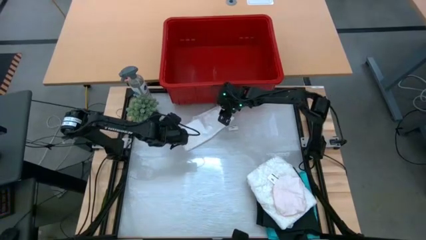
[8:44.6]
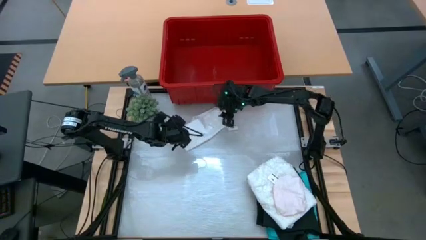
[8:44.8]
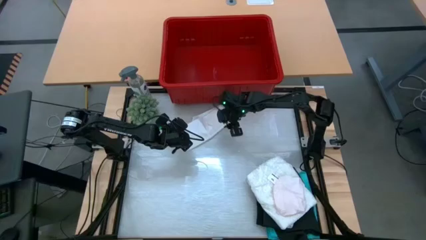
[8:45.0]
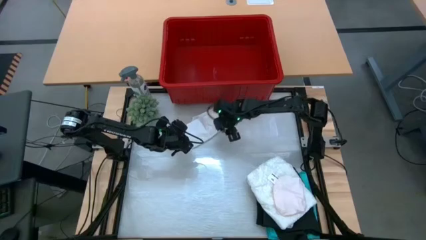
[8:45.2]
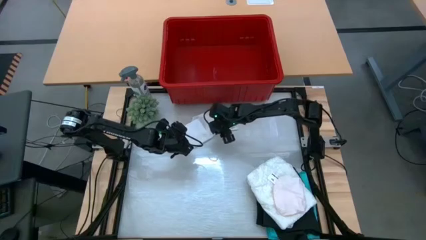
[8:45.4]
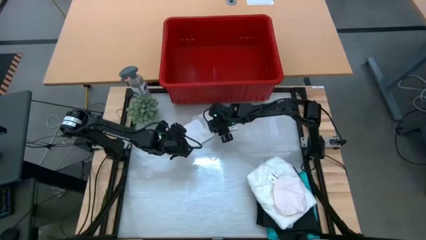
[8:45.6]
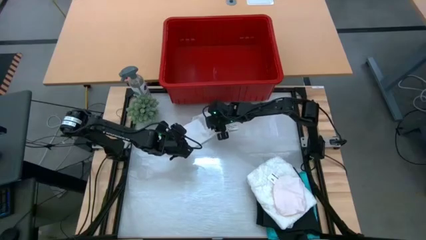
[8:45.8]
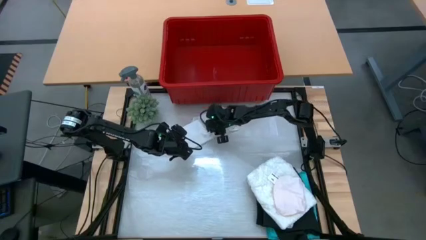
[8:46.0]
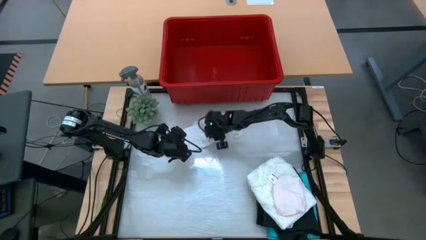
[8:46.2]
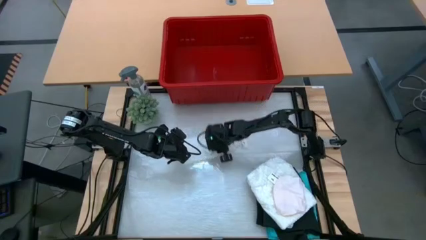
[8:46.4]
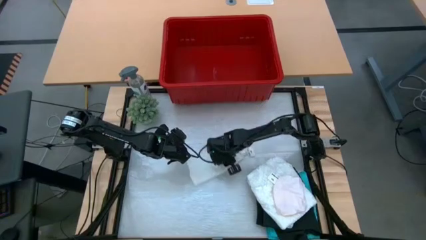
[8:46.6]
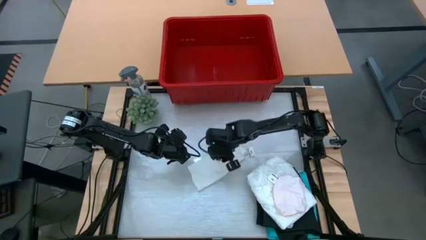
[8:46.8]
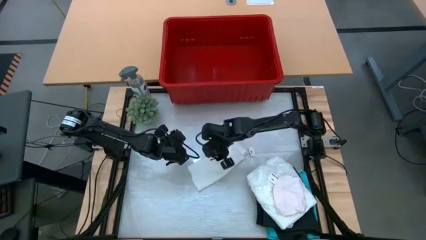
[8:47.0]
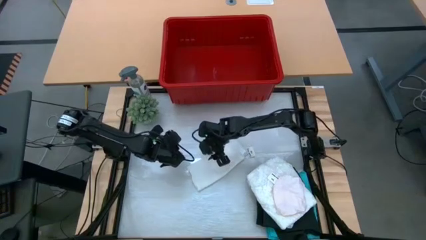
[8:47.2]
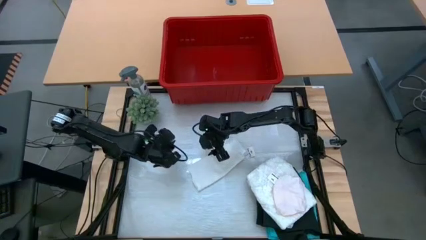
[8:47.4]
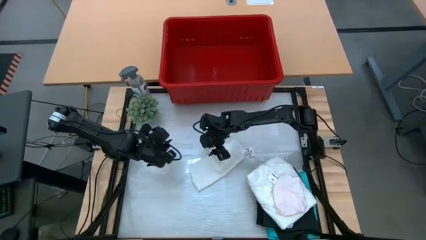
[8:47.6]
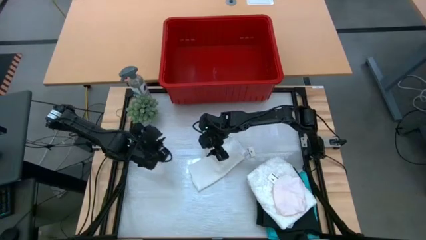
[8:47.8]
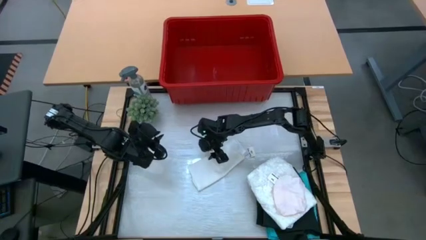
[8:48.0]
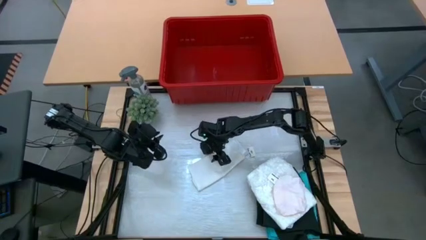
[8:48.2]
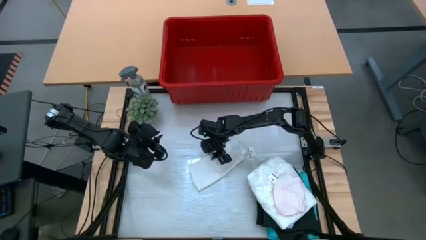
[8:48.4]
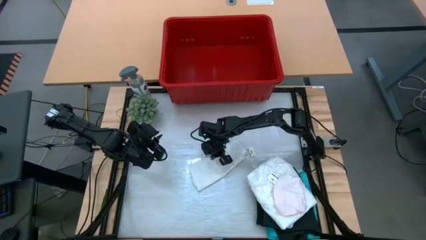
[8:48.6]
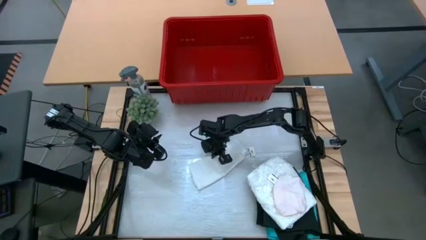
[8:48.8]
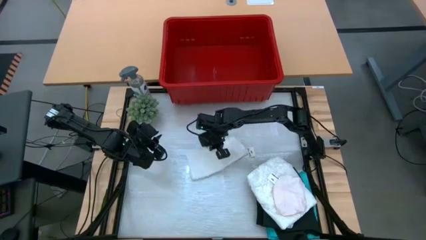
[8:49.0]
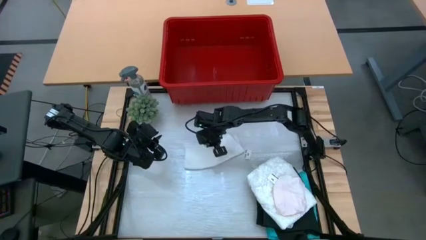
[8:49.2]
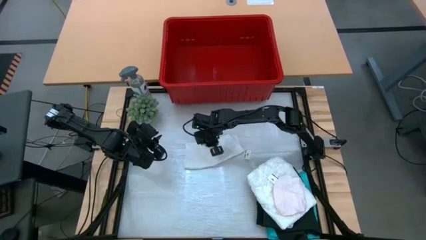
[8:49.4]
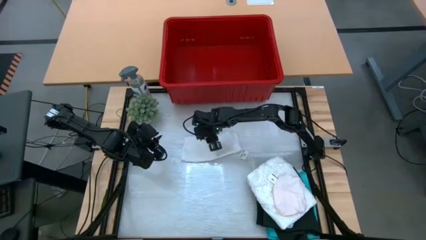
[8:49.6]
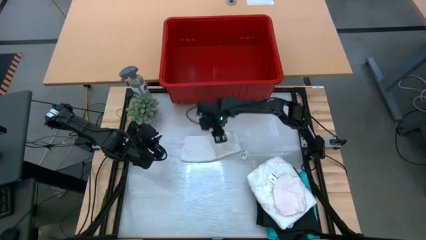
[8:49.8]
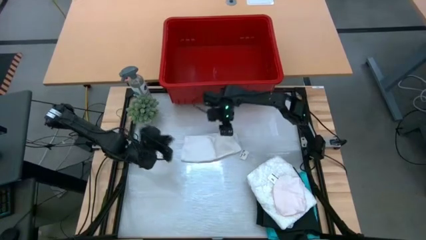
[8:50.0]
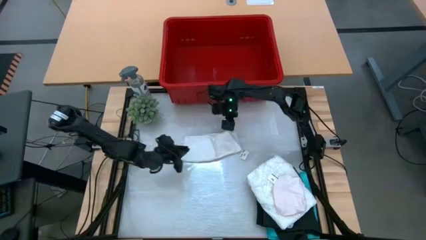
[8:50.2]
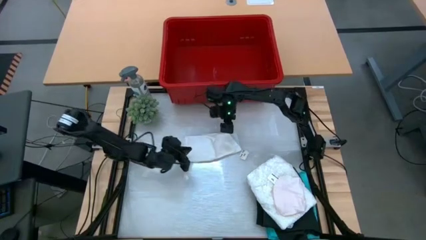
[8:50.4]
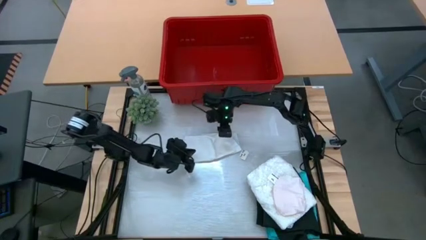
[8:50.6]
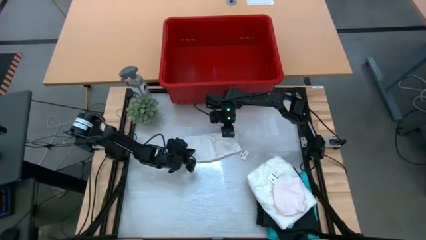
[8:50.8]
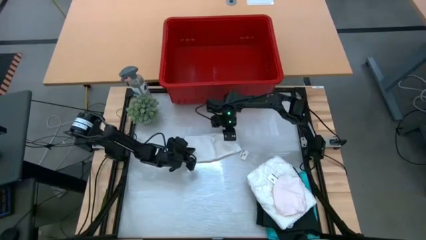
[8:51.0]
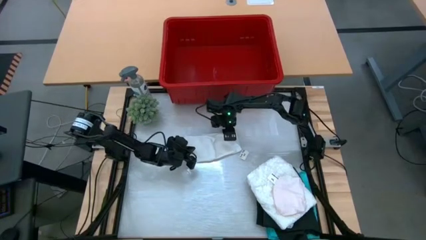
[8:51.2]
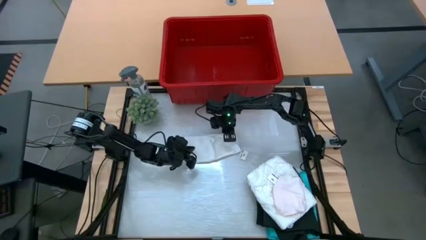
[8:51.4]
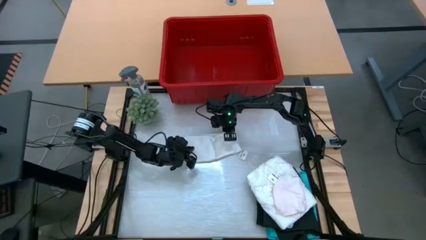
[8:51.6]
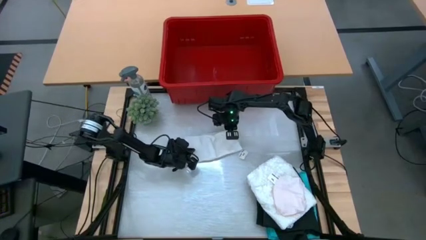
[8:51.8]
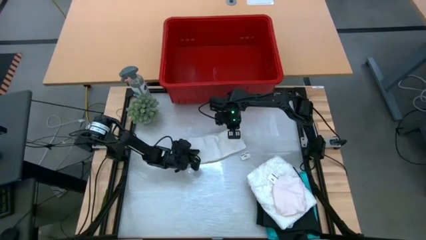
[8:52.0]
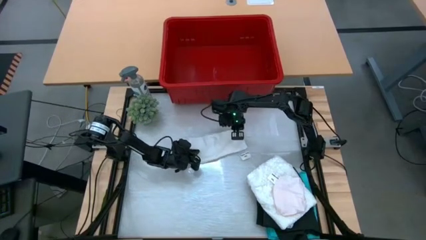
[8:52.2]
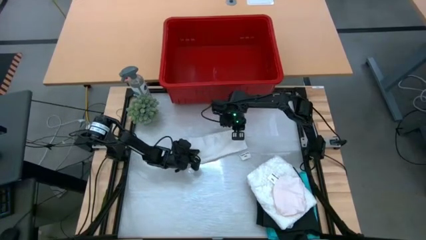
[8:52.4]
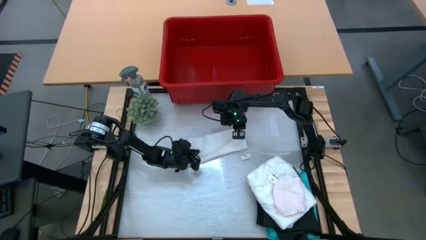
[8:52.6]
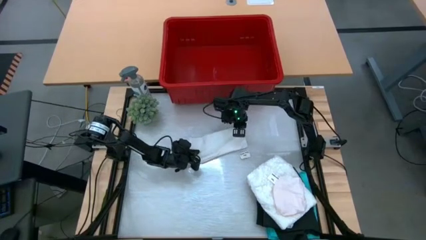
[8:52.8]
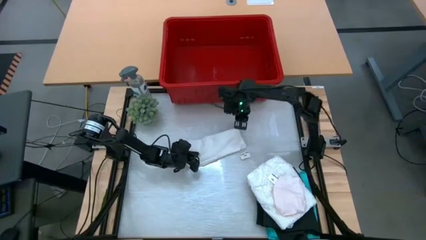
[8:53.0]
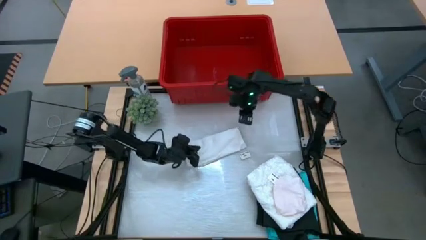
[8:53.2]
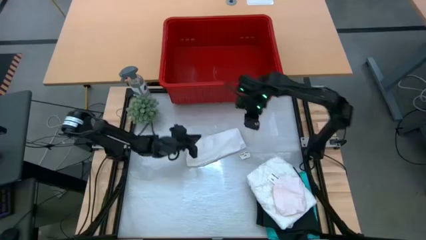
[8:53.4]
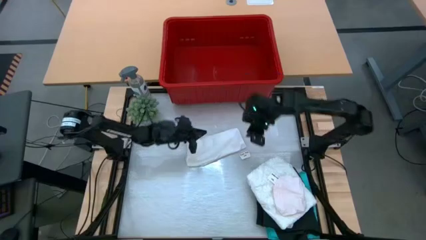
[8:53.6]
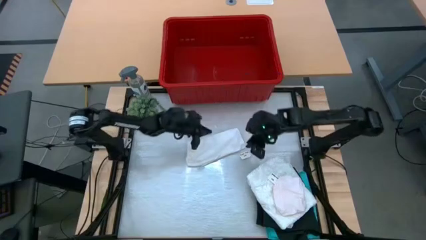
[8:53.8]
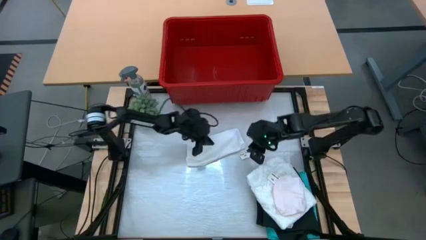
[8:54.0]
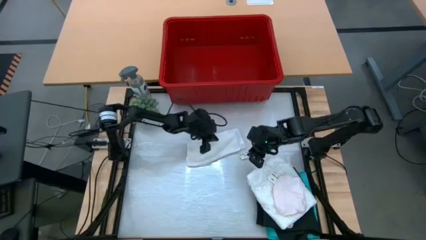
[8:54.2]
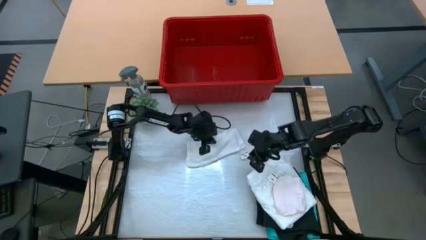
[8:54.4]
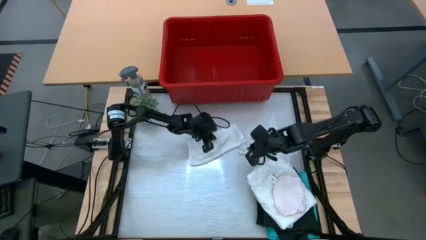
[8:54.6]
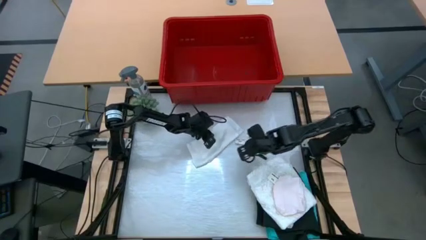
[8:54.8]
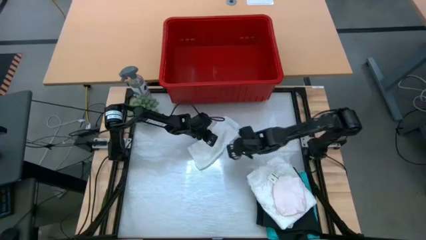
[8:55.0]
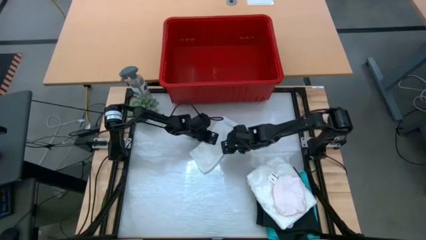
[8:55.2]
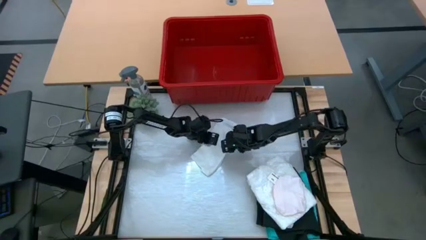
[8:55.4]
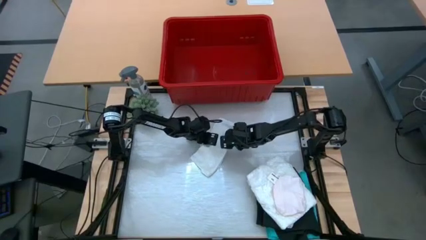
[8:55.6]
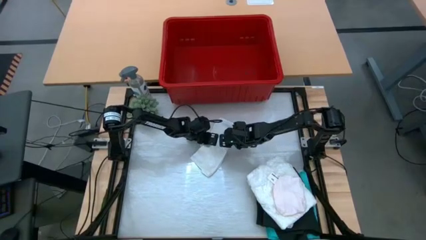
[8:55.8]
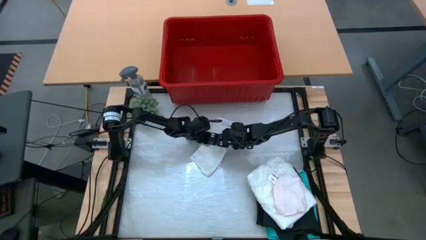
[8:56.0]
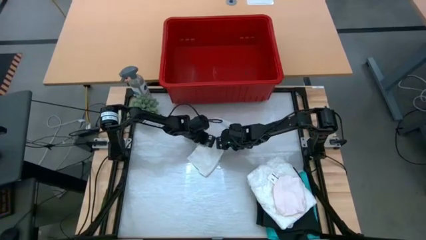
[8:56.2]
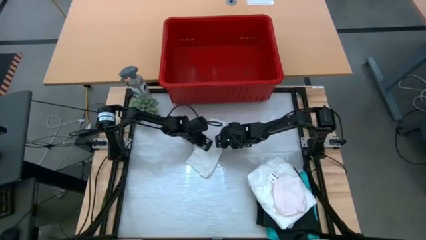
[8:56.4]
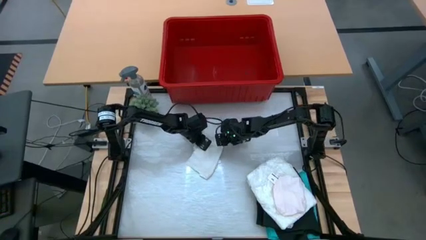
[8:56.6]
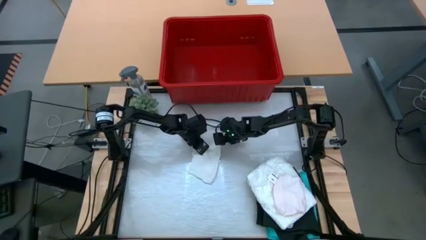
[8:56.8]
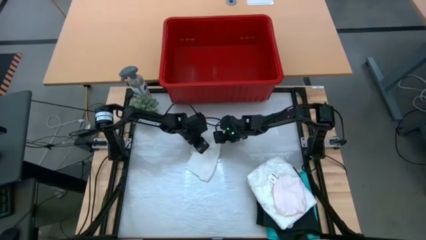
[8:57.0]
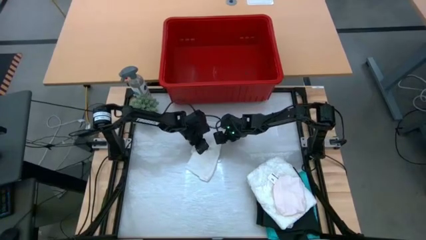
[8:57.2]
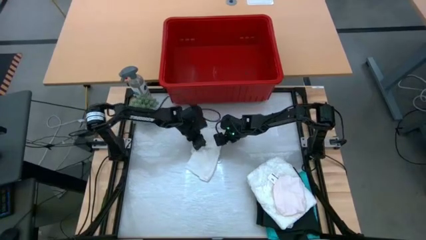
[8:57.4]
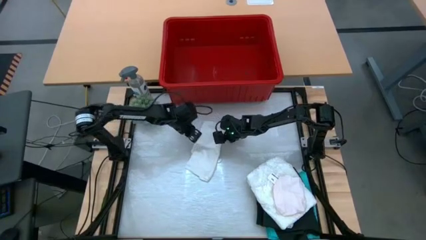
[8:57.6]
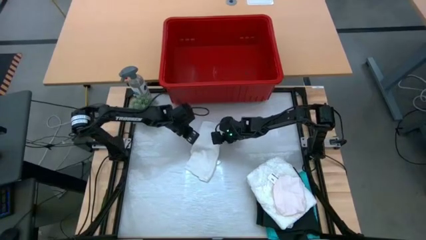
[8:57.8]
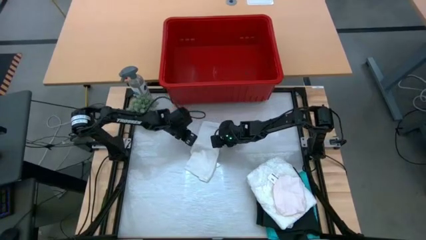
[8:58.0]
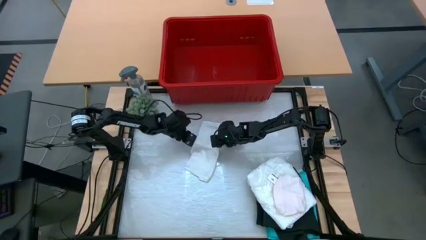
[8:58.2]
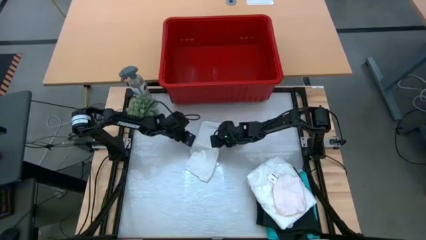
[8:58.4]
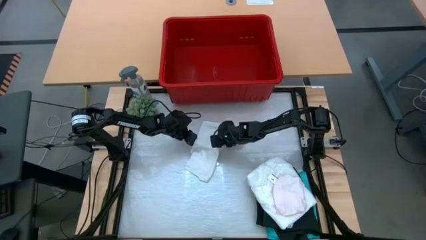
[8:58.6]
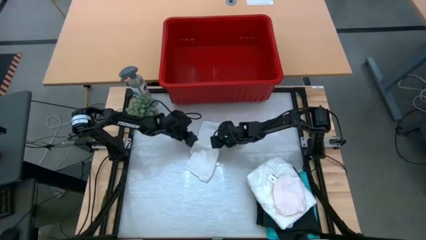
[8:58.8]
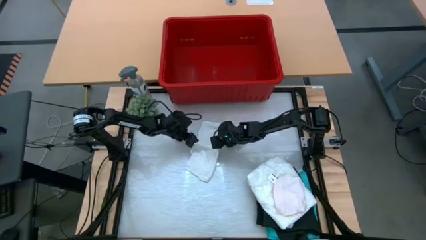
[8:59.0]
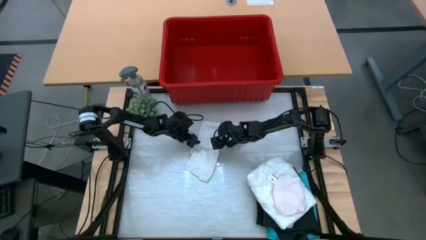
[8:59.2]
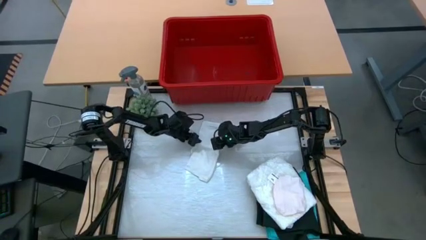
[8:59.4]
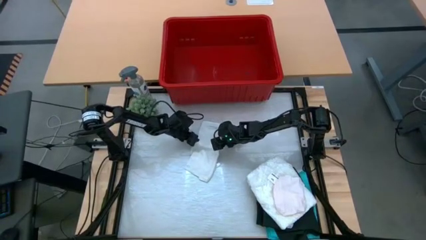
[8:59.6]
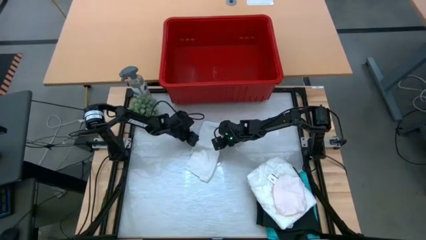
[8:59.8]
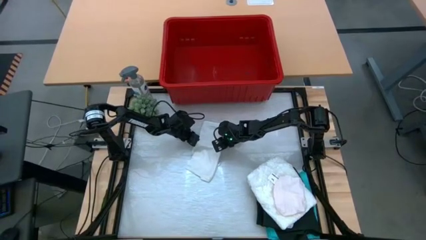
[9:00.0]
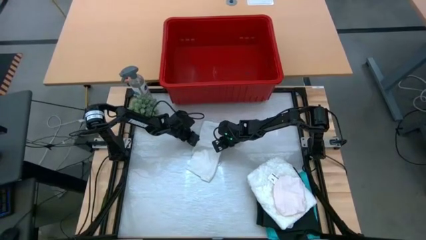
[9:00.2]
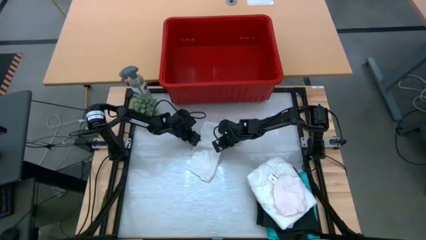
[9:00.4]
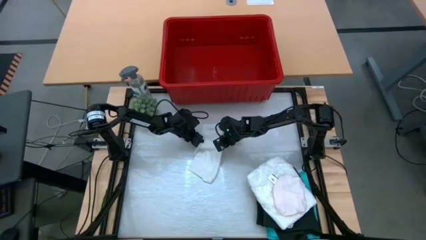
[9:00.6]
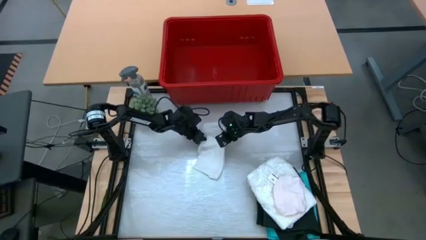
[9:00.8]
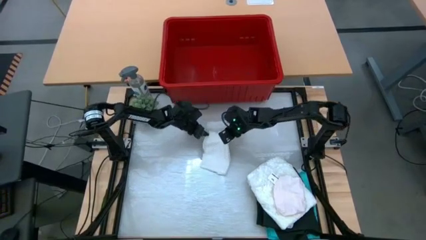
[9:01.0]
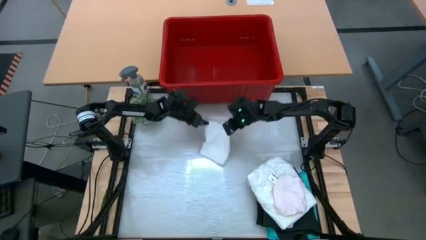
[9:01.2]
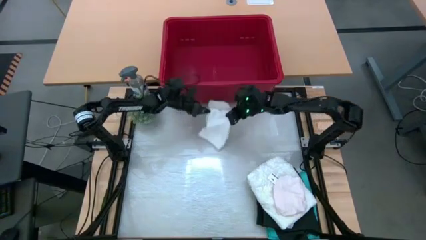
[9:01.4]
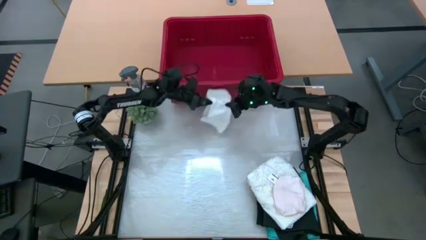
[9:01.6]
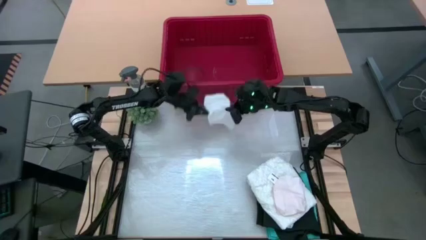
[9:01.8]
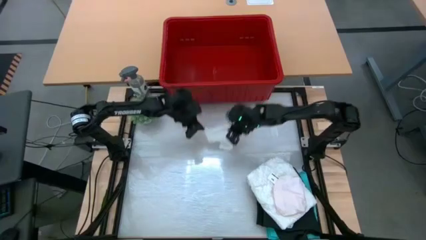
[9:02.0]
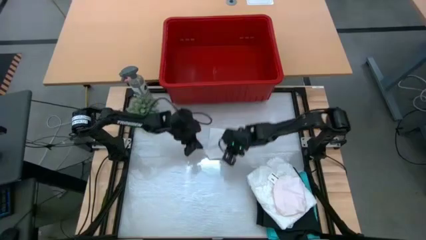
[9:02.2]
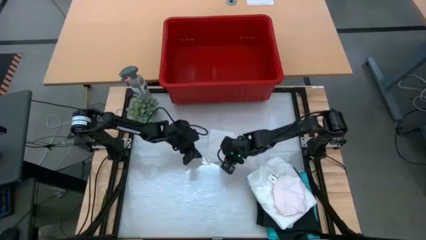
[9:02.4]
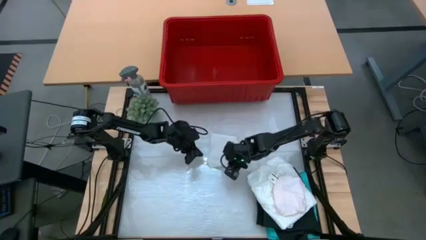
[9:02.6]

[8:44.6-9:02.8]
Task: Fold Laundry from Bin
Fold the white boxers
